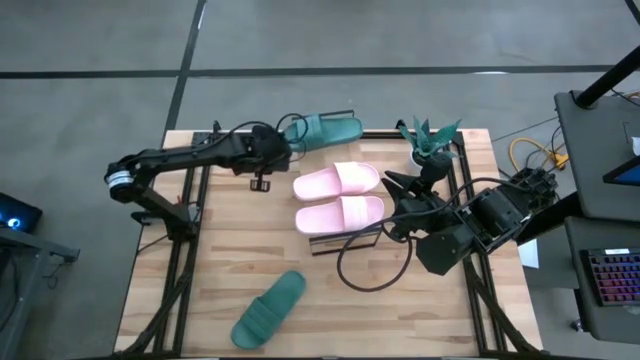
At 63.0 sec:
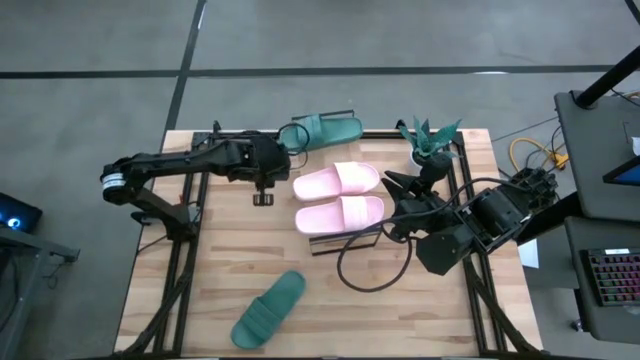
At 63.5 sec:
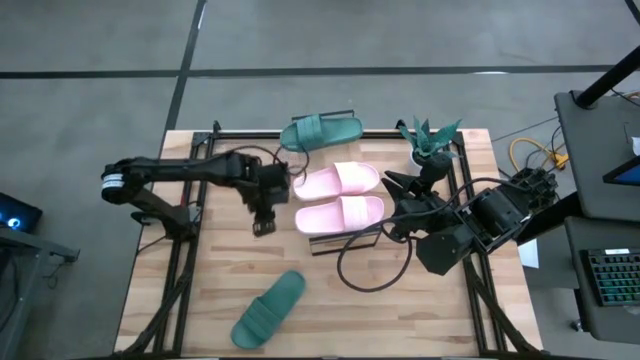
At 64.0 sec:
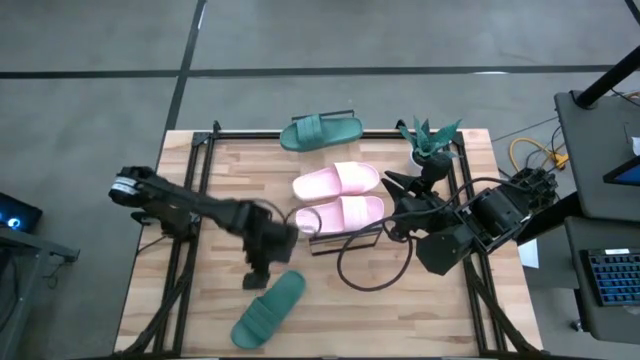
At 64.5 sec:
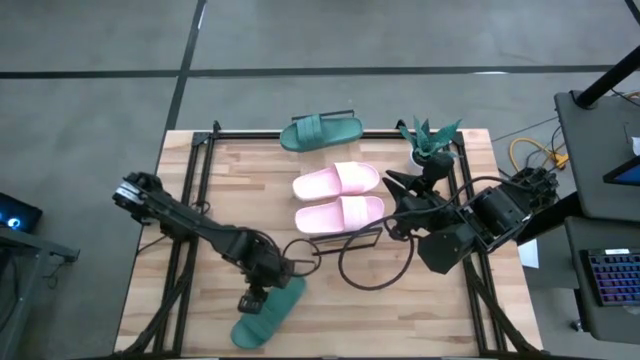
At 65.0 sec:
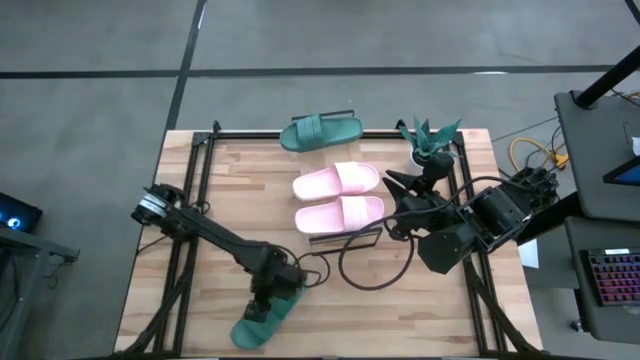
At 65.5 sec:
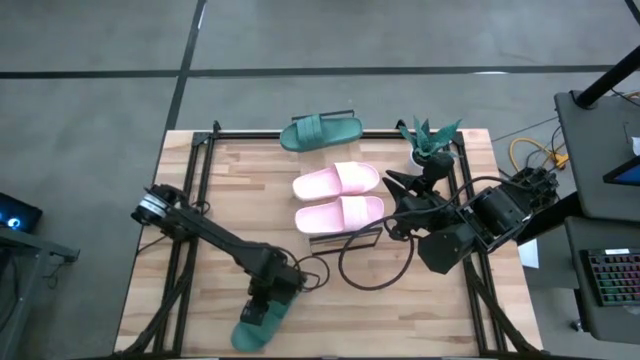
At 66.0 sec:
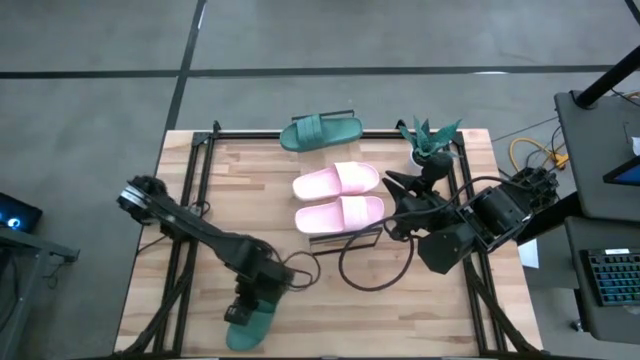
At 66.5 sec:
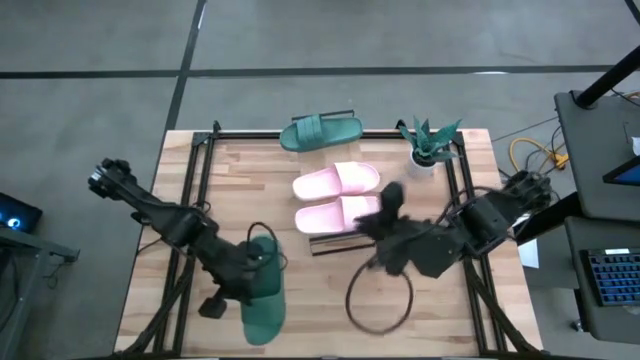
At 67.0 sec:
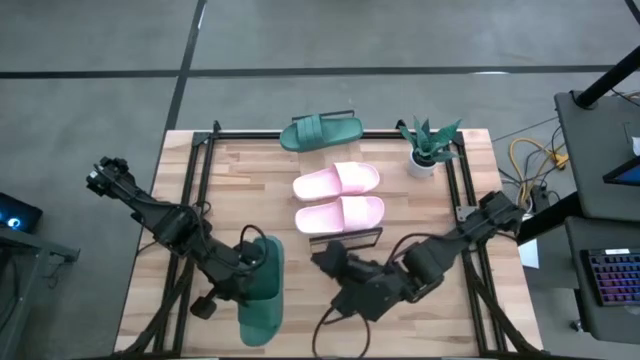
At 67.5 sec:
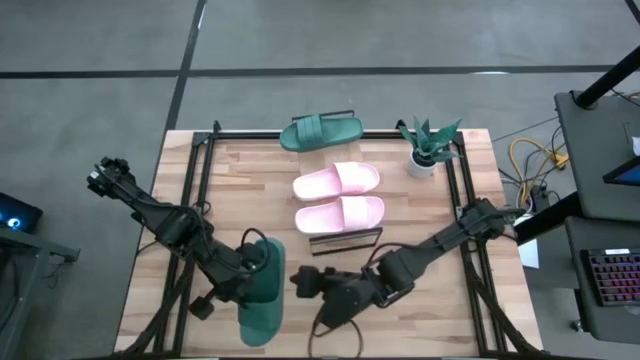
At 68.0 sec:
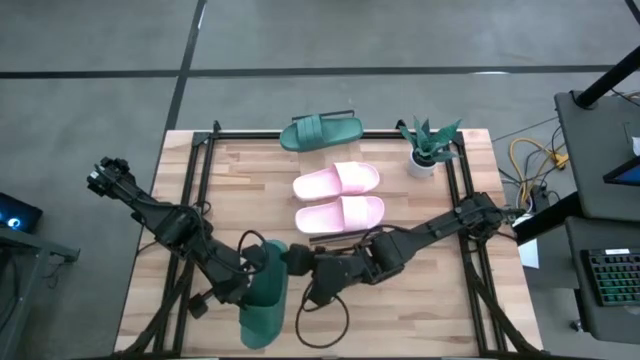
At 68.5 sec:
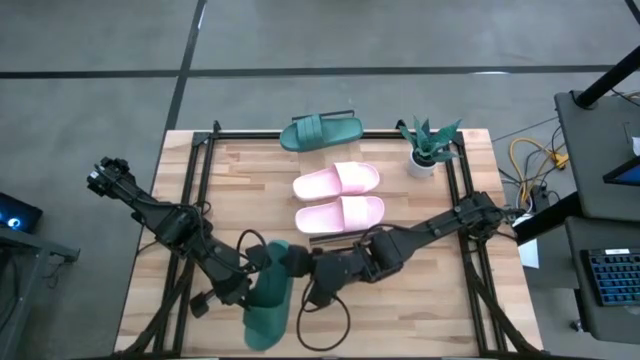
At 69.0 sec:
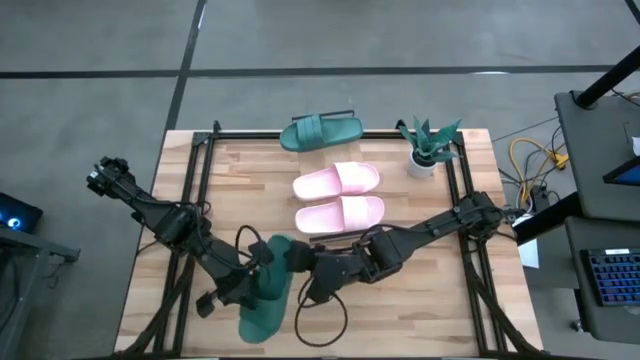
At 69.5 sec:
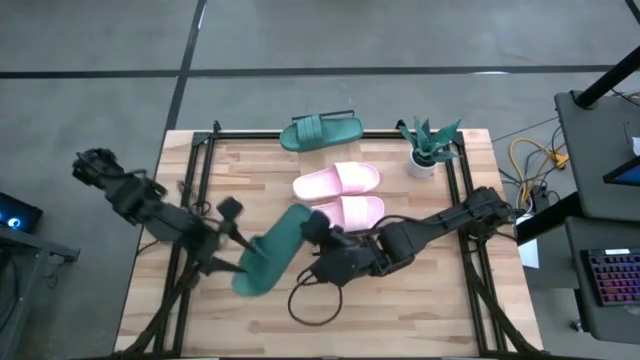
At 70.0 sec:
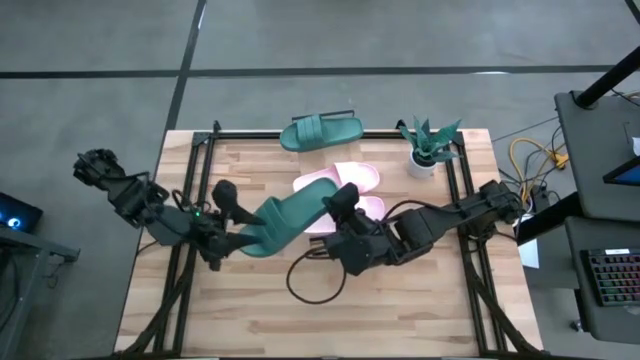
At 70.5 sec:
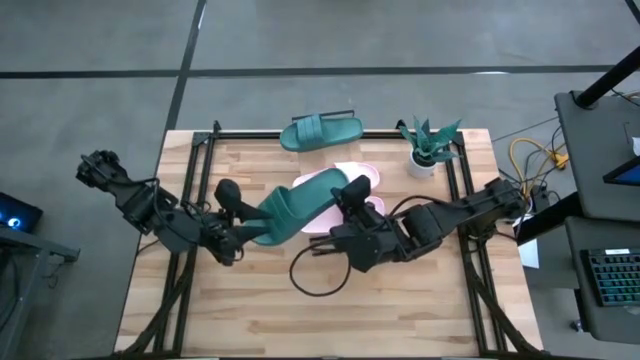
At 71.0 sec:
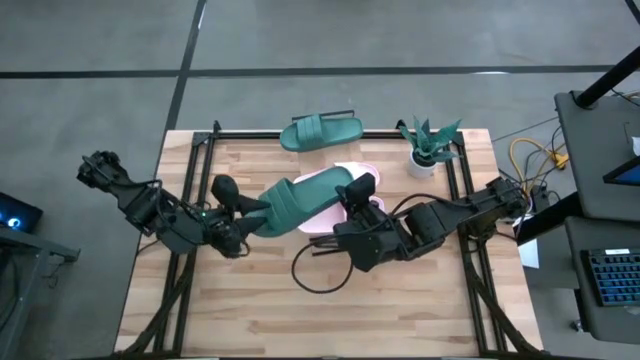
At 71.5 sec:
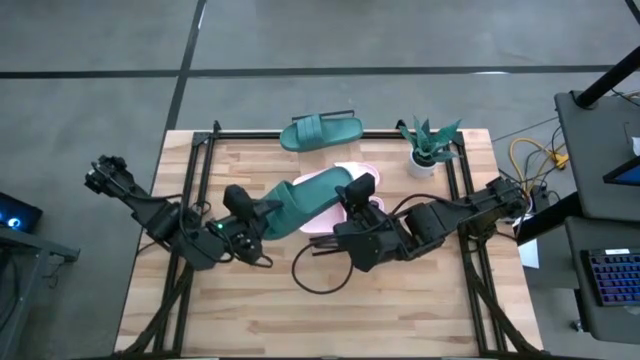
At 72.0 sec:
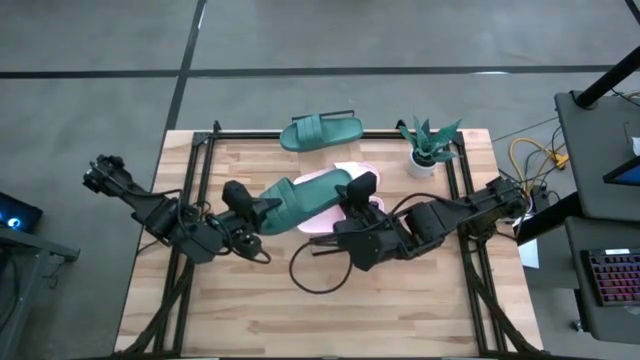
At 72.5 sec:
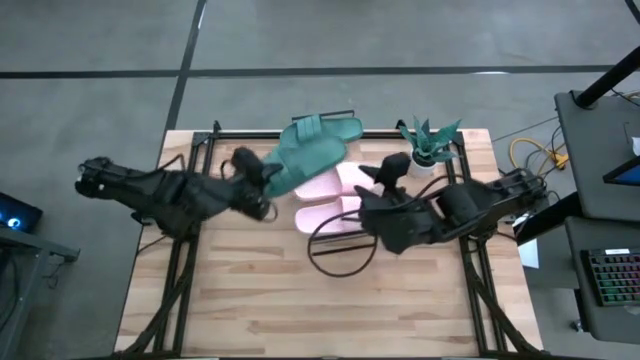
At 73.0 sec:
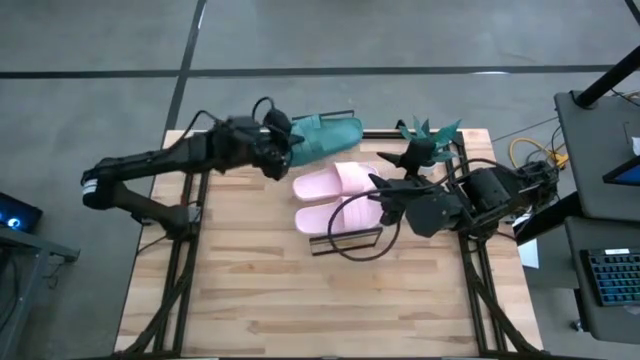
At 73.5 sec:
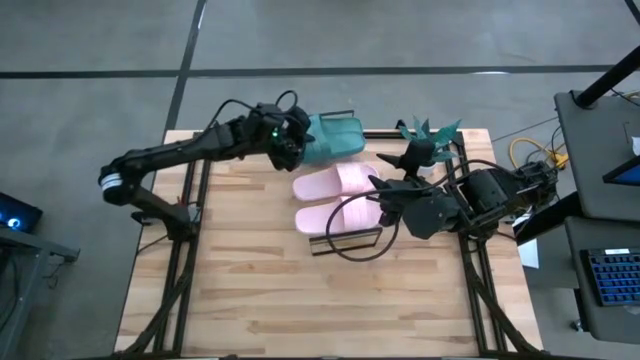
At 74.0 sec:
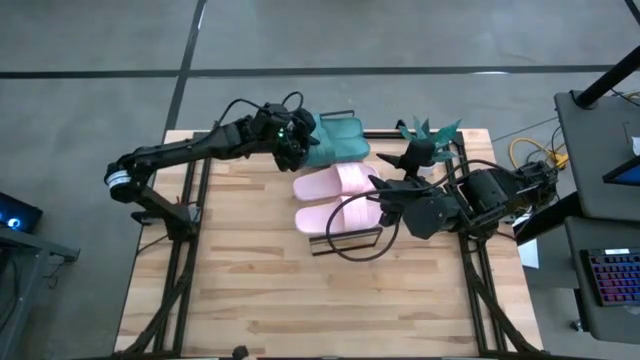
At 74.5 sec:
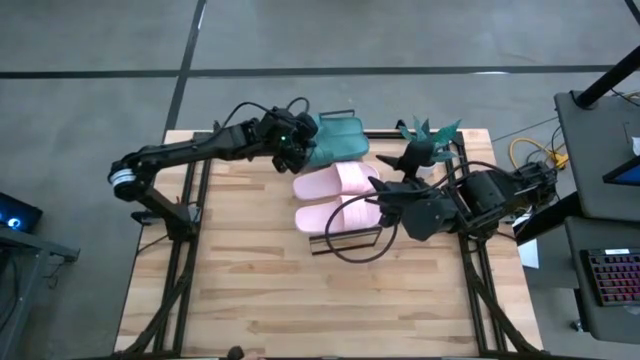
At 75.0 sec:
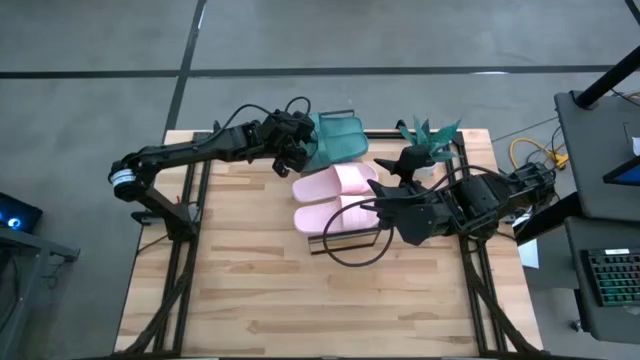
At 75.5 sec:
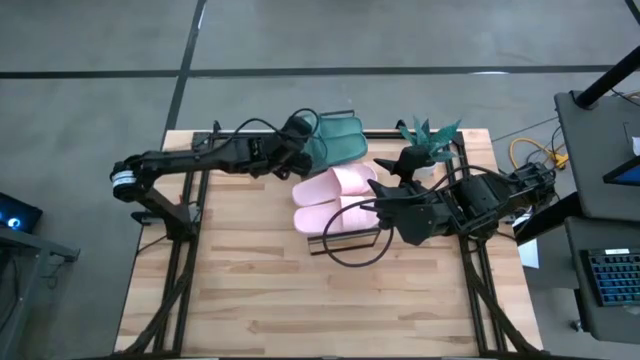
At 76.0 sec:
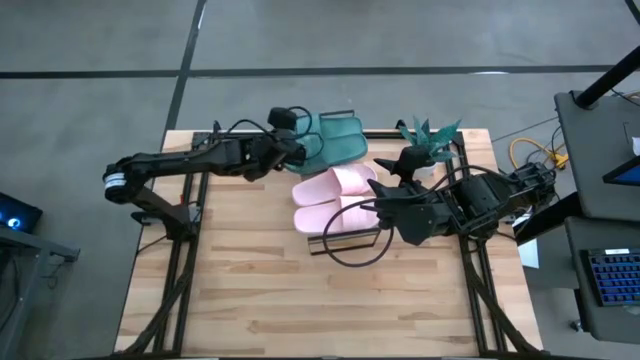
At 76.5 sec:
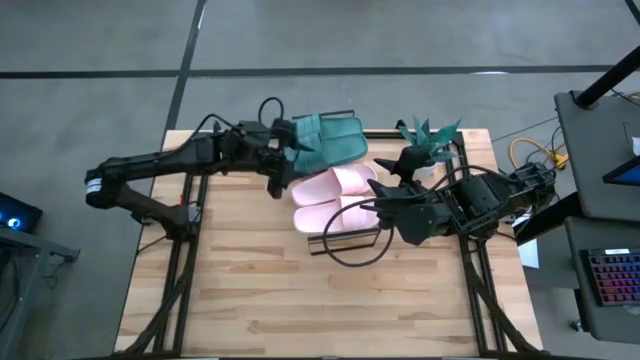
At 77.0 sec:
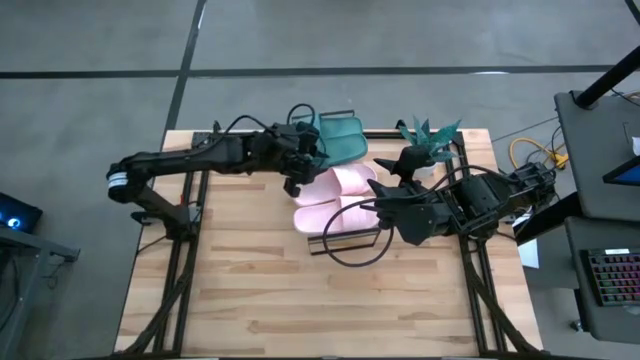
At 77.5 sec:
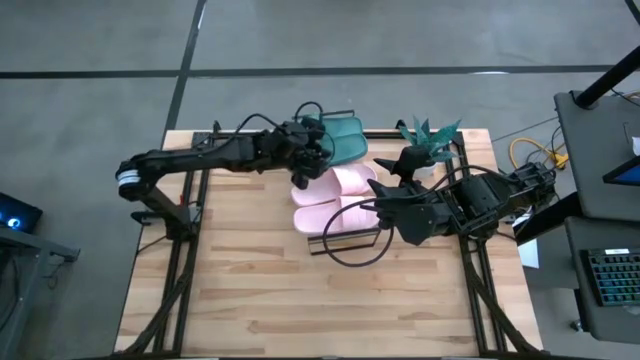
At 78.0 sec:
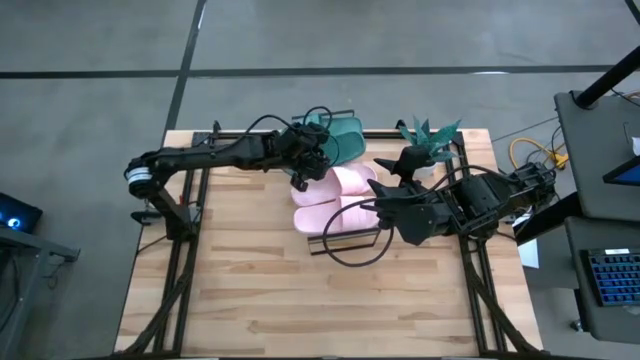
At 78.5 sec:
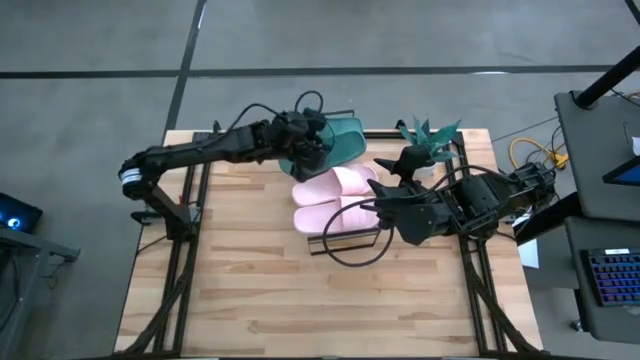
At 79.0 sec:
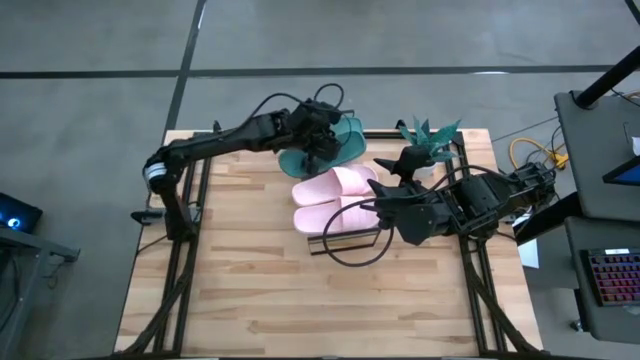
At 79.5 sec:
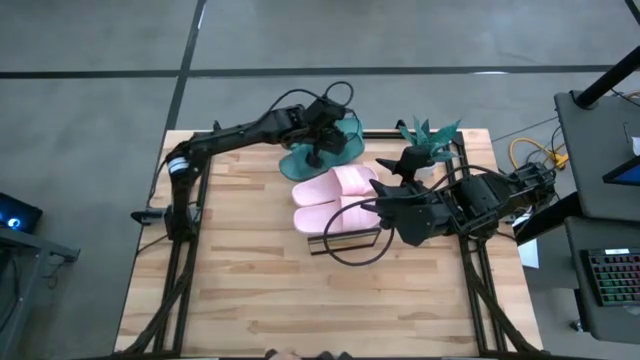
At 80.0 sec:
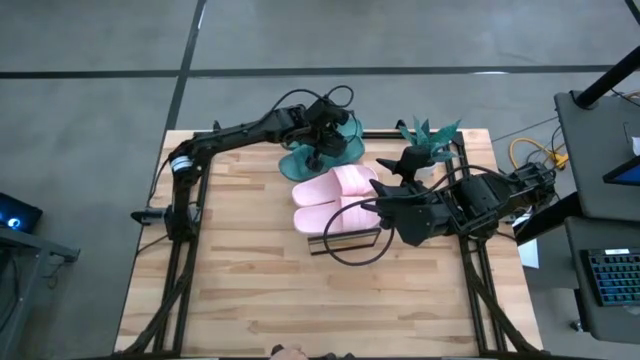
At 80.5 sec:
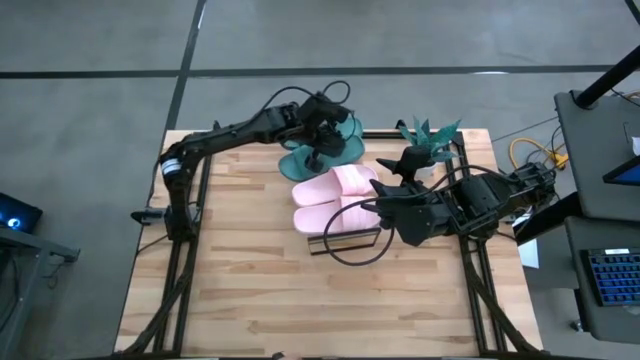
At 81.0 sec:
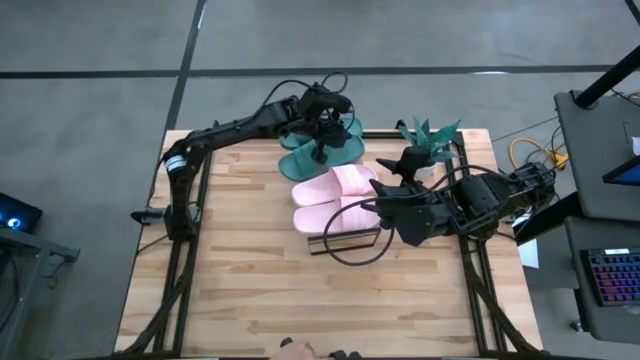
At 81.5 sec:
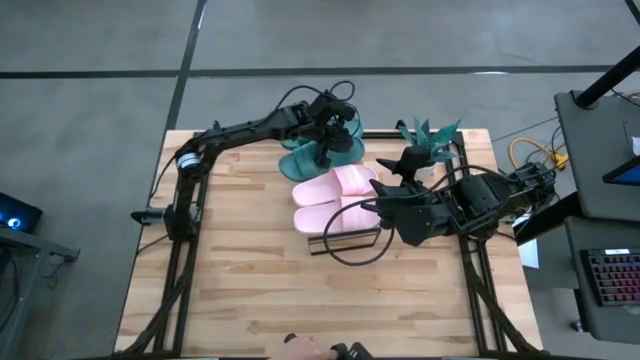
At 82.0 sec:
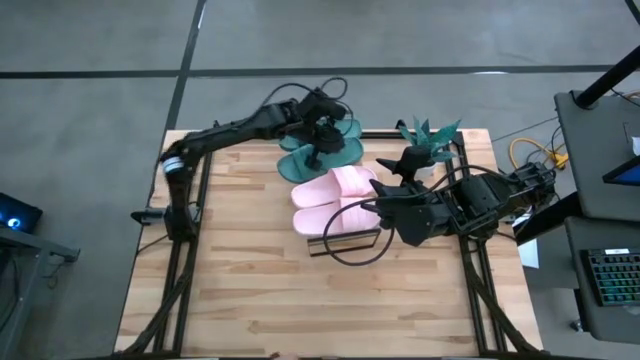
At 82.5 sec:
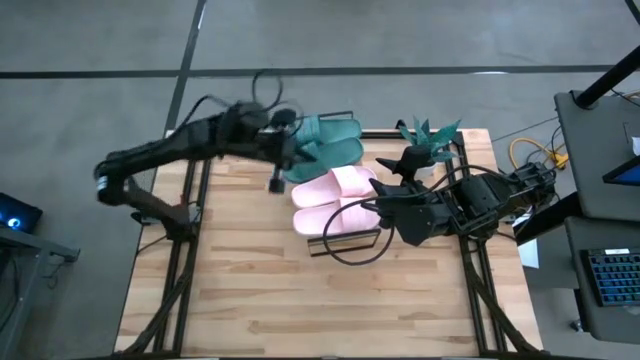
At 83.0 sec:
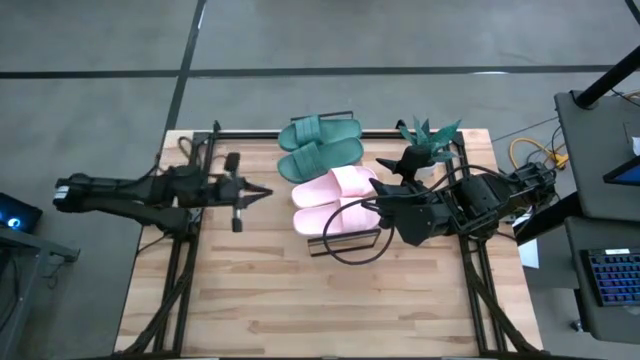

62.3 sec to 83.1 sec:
Task: Pick and place slides into the shelf
Put the green slide on the shelf
